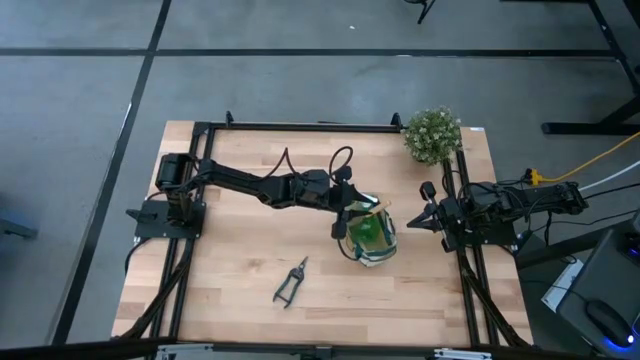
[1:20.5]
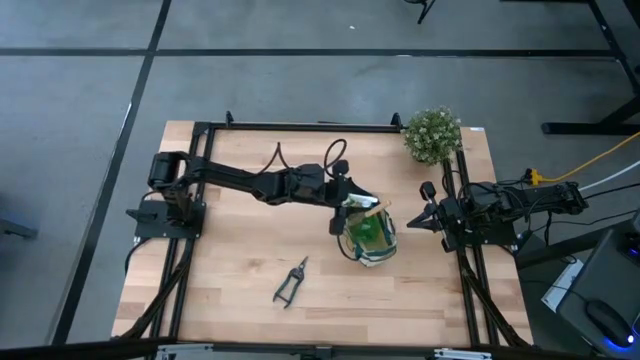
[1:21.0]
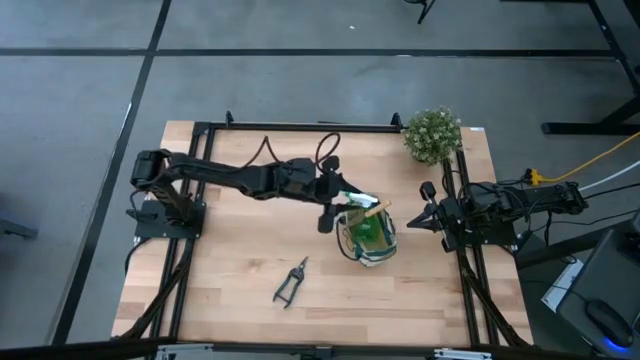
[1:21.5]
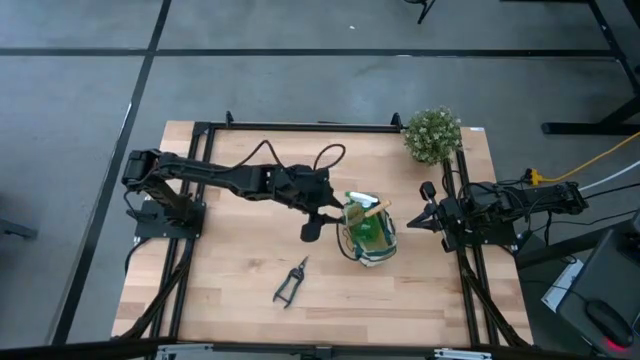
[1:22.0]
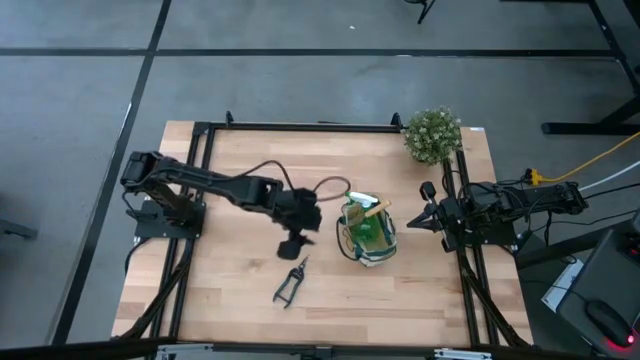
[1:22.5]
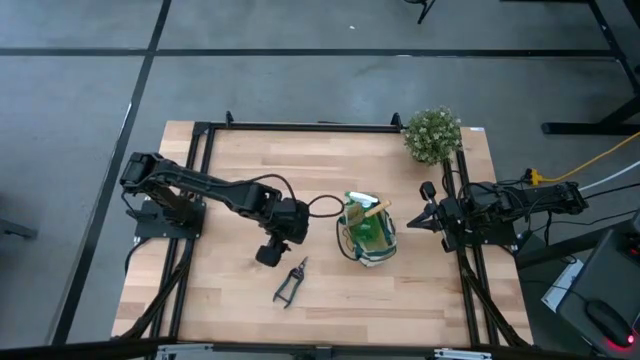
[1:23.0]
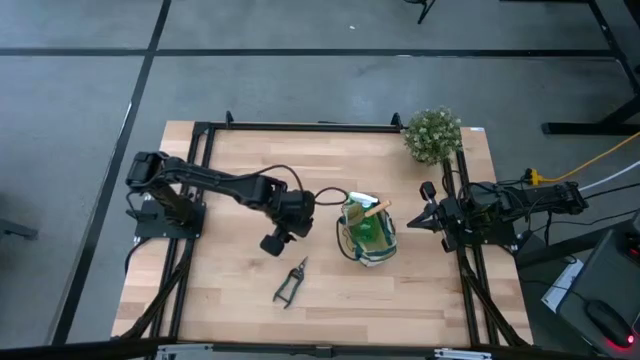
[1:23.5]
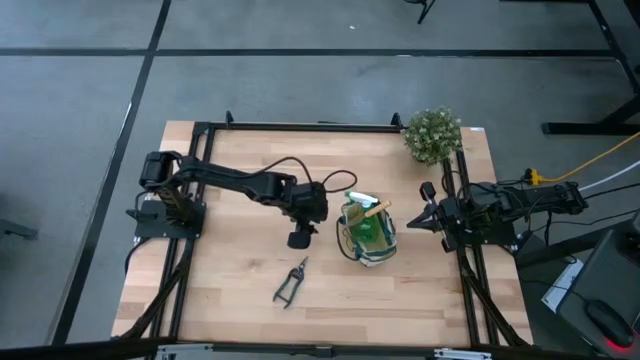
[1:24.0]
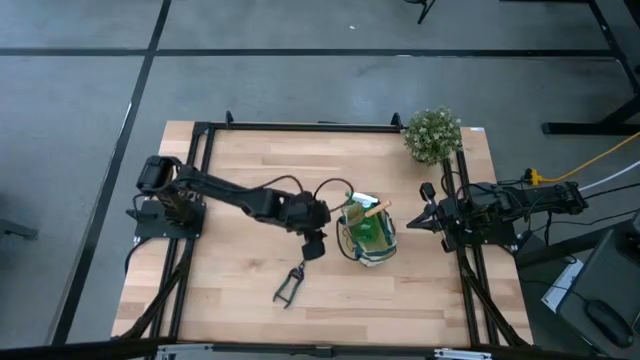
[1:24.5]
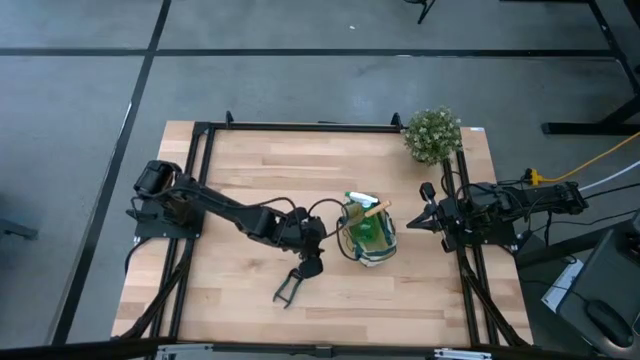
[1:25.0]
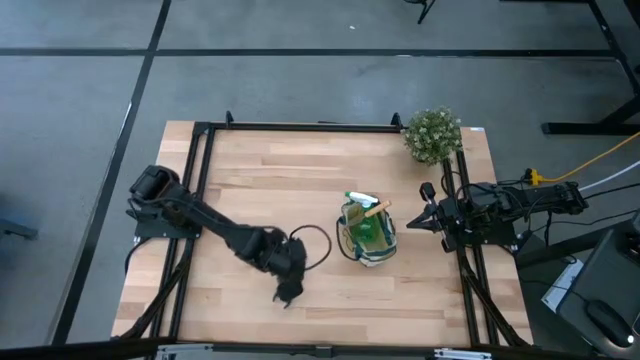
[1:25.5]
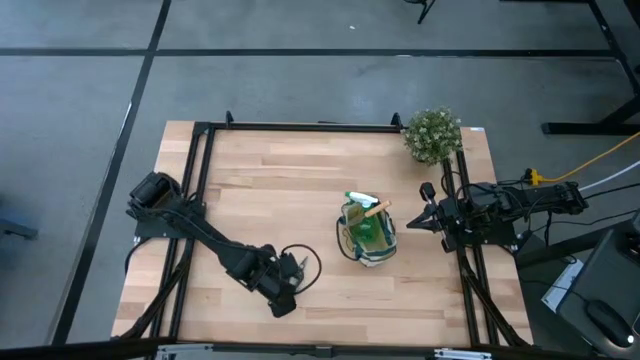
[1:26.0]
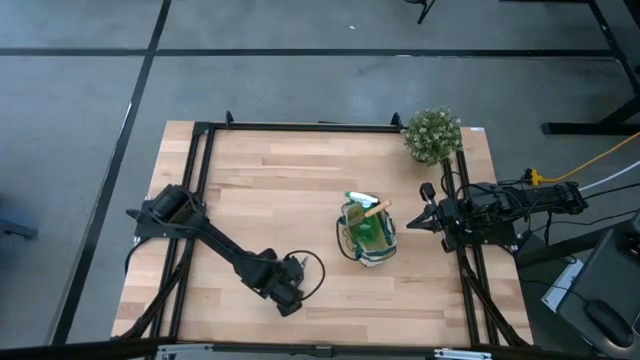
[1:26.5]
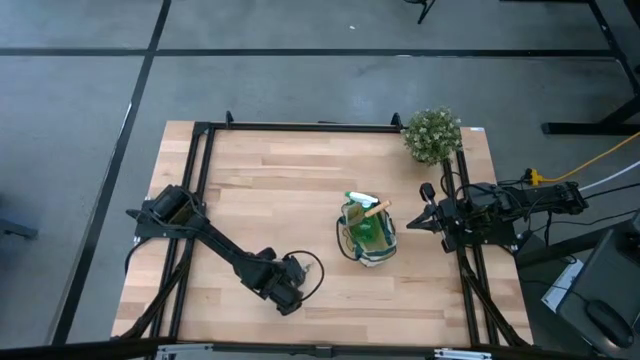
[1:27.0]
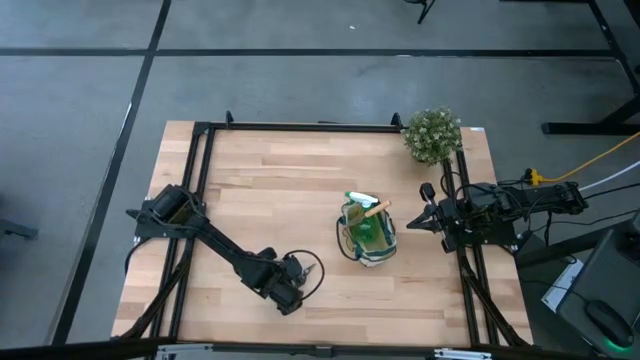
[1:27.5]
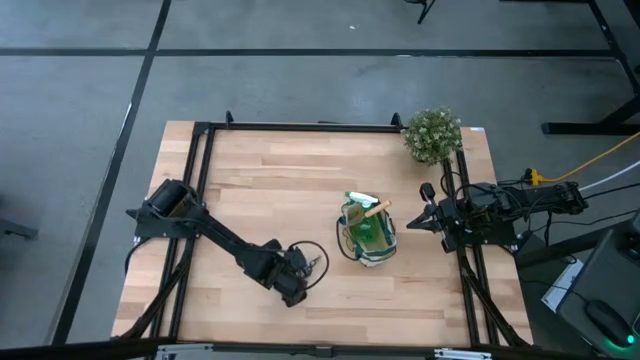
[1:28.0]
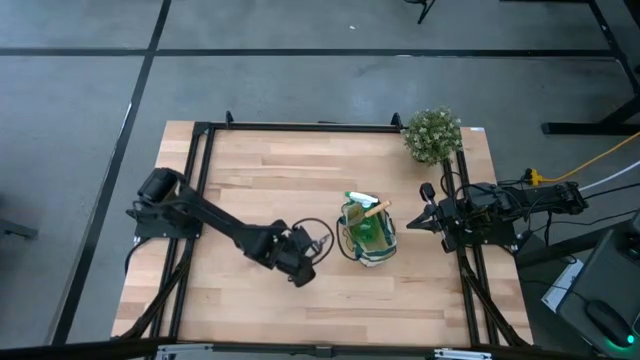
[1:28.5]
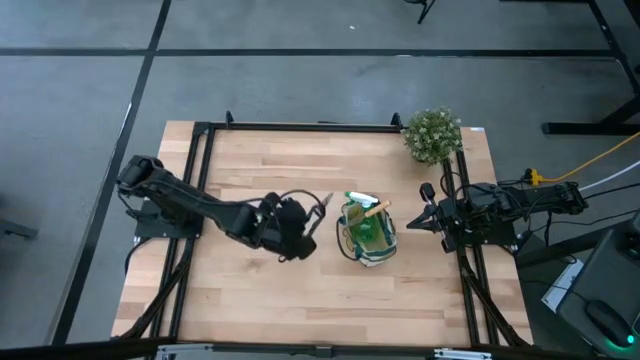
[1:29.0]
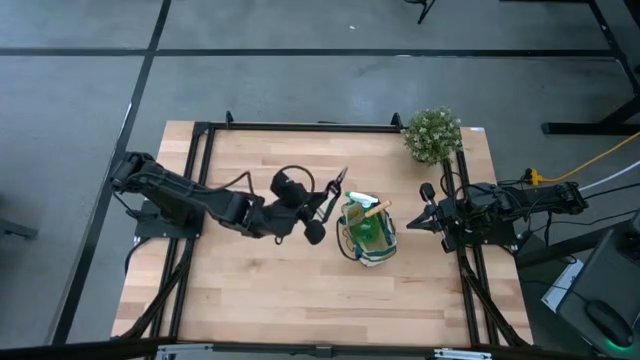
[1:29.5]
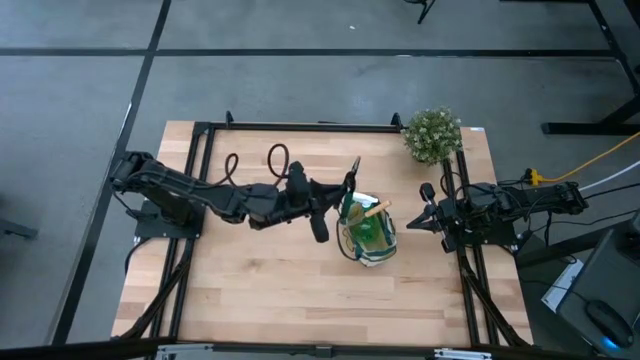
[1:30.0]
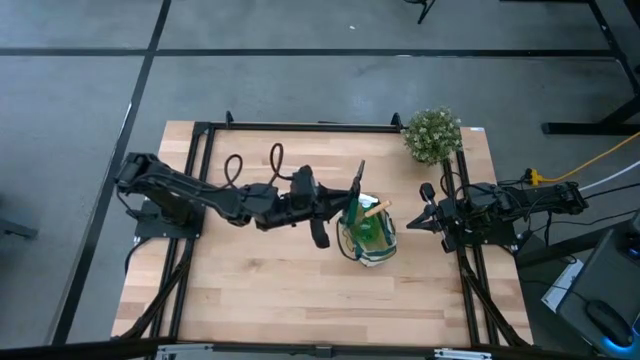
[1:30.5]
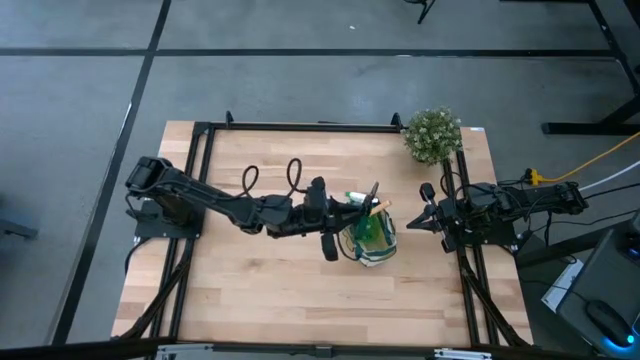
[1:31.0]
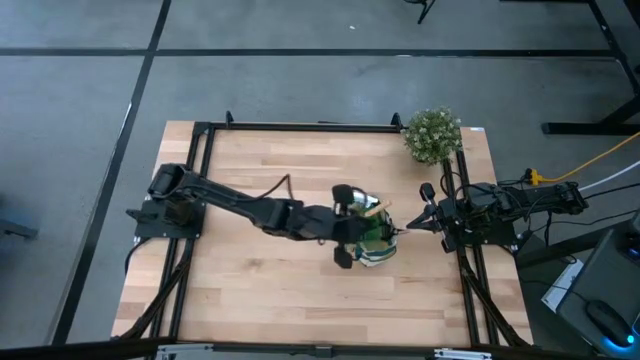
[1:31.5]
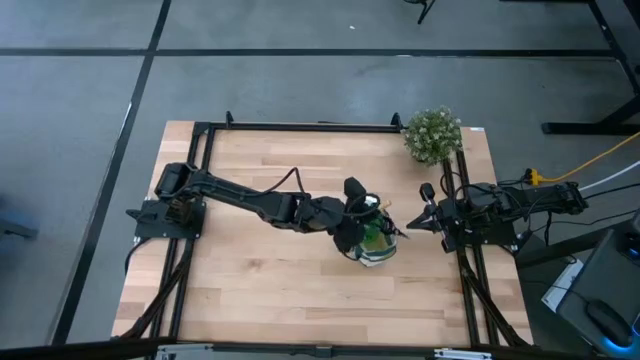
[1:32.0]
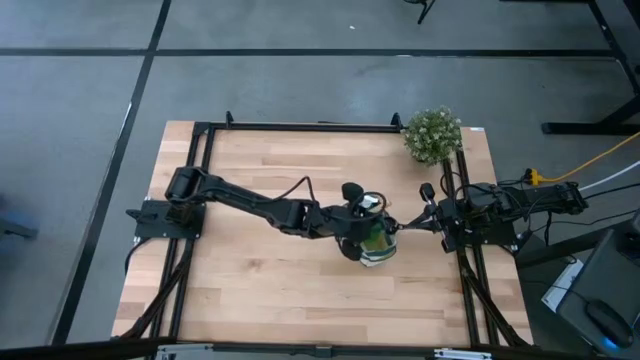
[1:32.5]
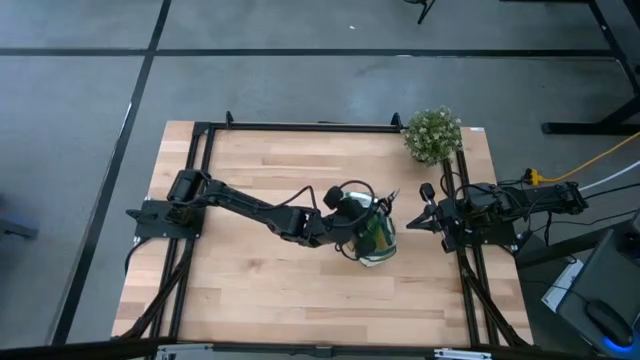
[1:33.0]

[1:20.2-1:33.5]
Task: Pick & Place Garden tools in Gardening bag
Put the shear scissors into the gardening bag

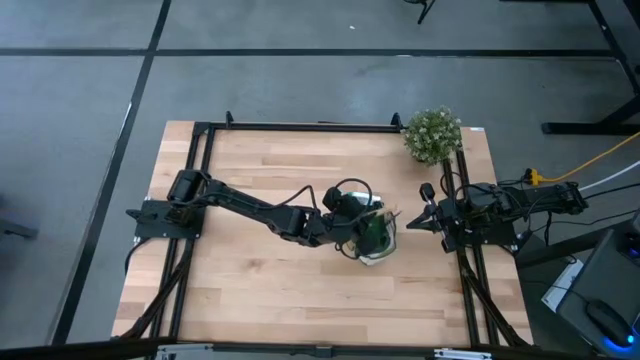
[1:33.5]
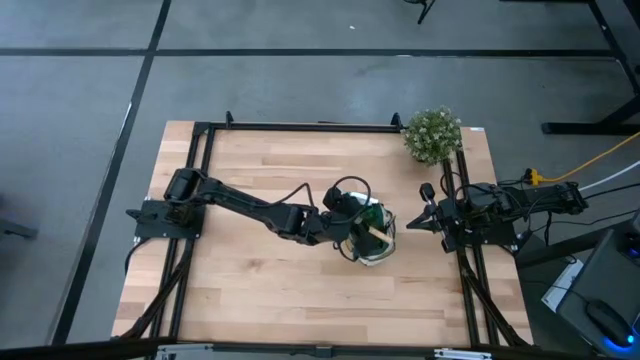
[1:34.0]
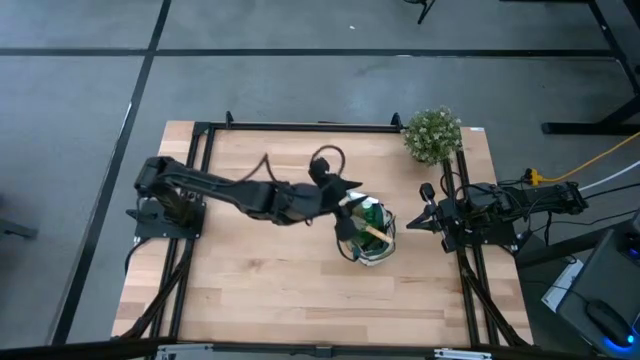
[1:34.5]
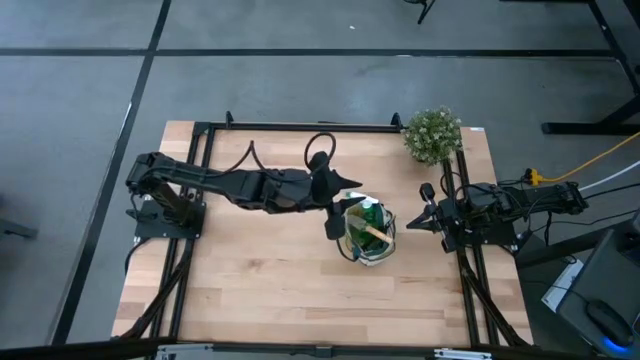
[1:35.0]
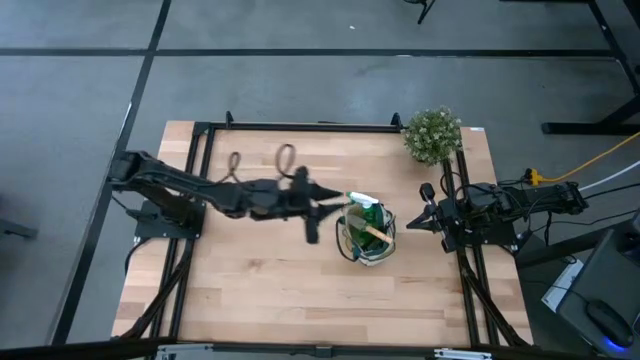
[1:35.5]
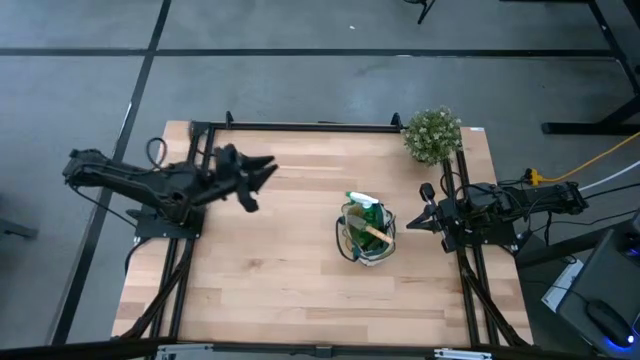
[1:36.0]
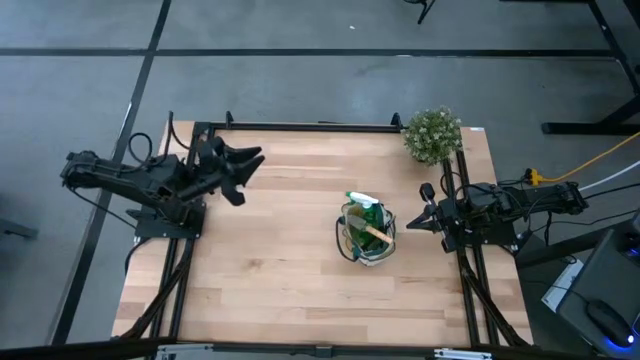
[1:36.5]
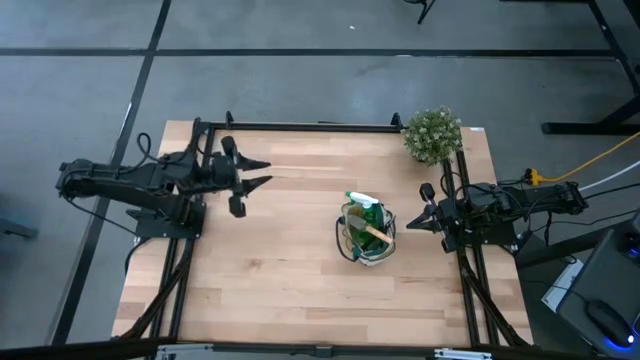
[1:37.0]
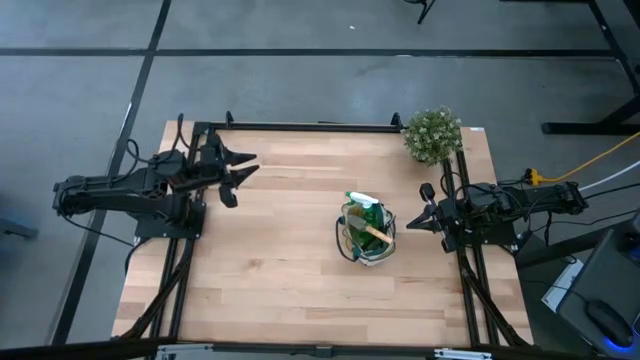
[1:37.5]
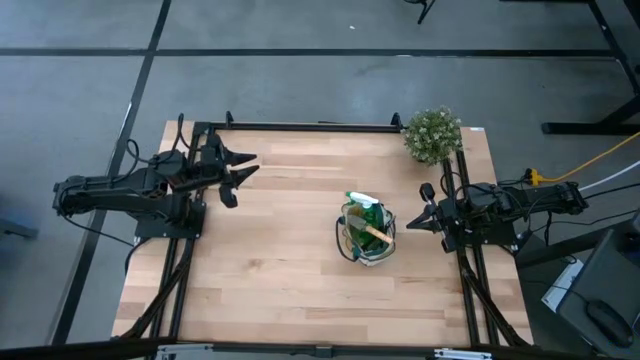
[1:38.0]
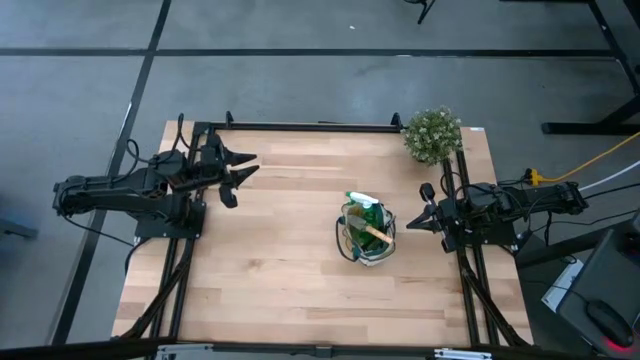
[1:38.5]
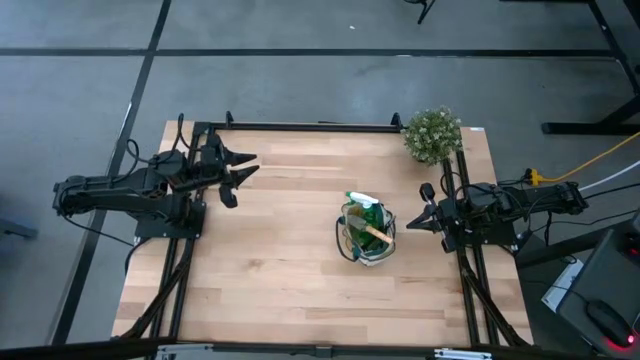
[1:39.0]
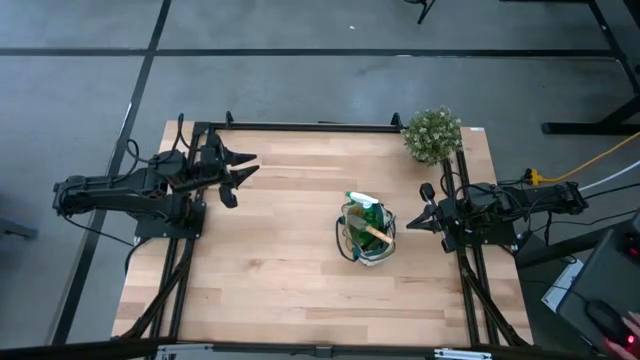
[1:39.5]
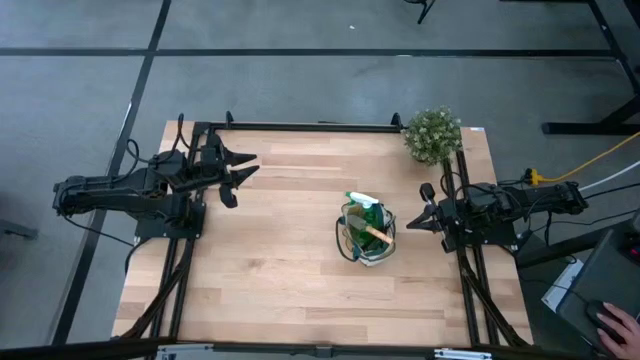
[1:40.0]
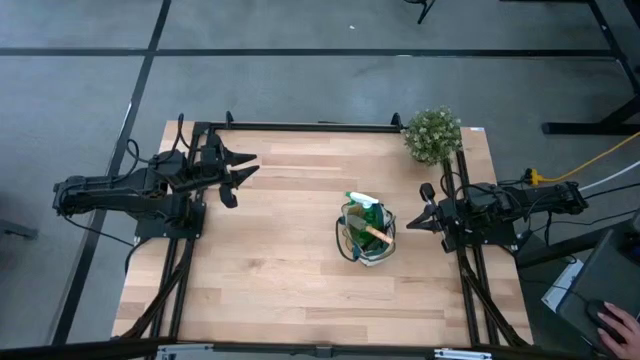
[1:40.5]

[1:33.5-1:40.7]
Return to Home Position

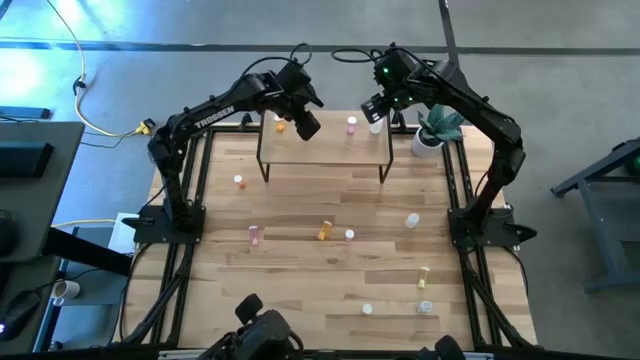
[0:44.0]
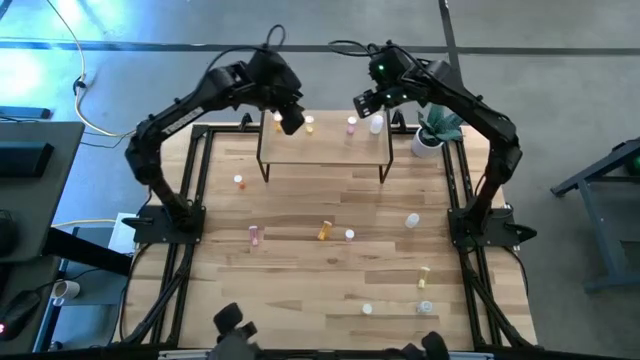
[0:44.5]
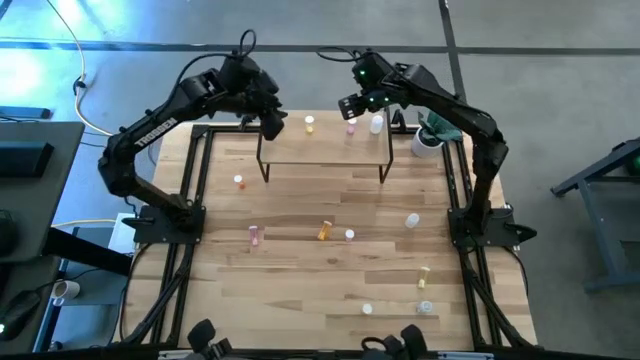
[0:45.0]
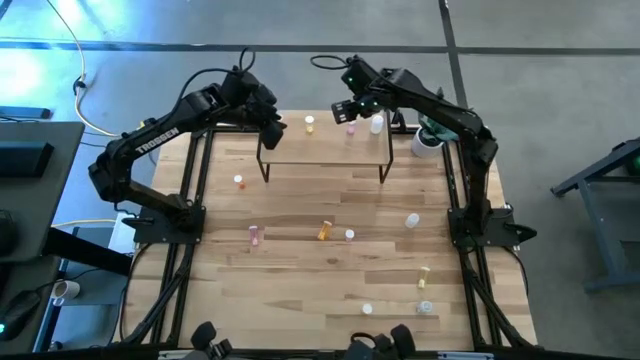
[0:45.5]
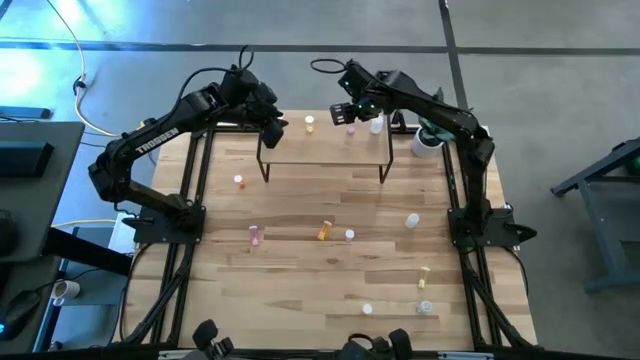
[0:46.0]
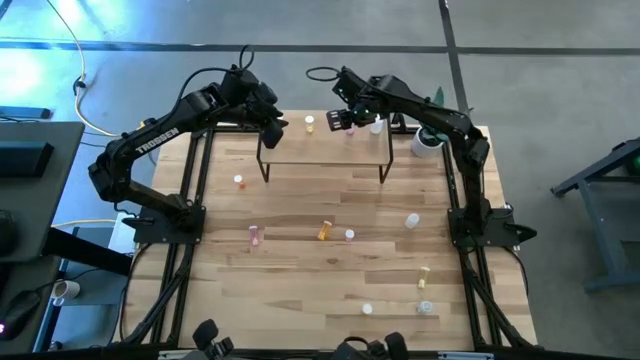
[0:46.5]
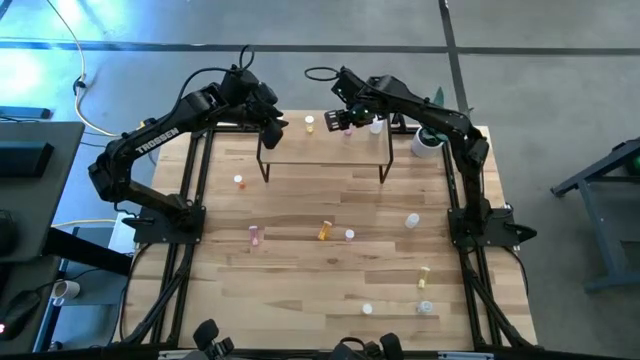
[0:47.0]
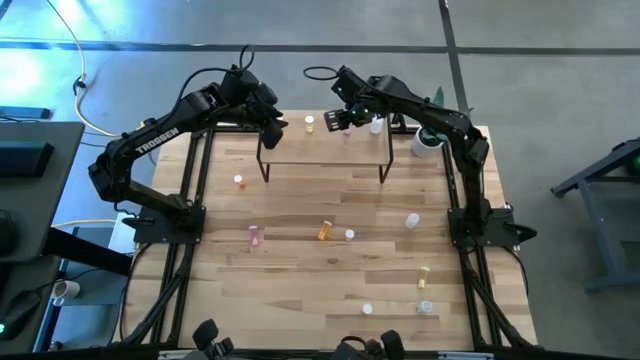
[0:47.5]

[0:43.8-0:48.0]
Task: Pick and place medicine bottles onto shelf by color
Adjust the pink pill bottle on the shelf
